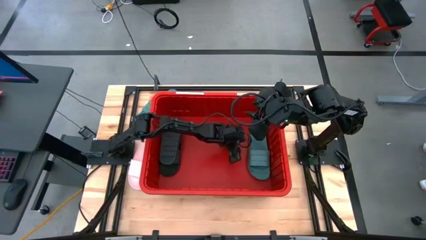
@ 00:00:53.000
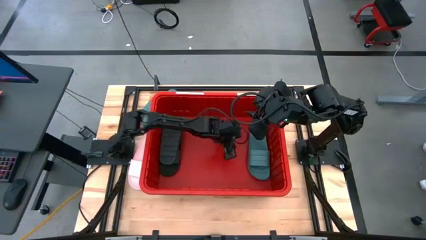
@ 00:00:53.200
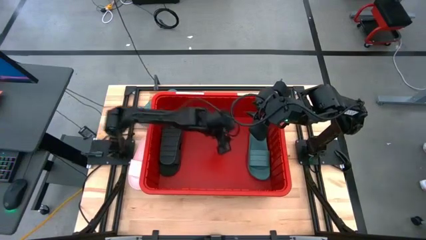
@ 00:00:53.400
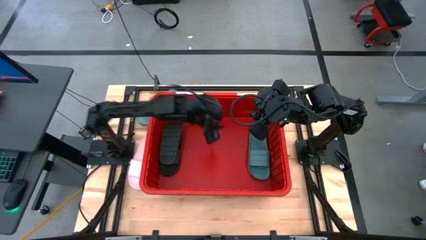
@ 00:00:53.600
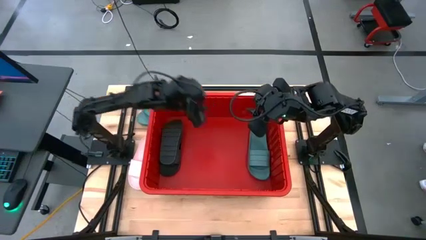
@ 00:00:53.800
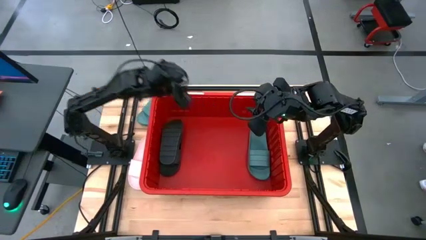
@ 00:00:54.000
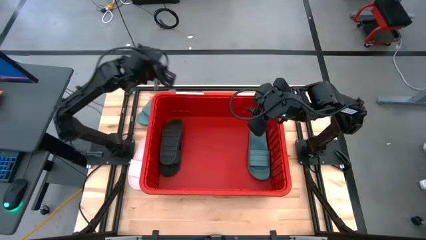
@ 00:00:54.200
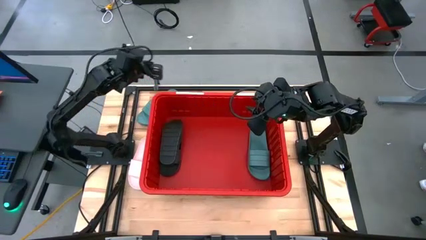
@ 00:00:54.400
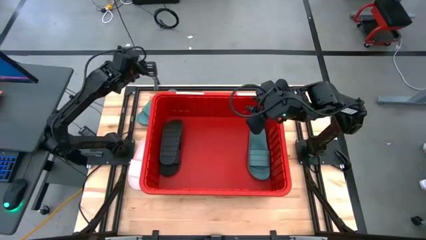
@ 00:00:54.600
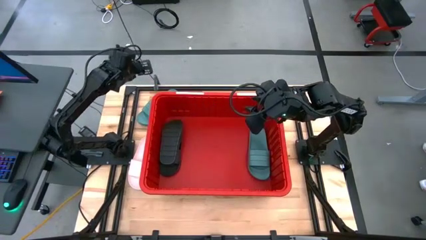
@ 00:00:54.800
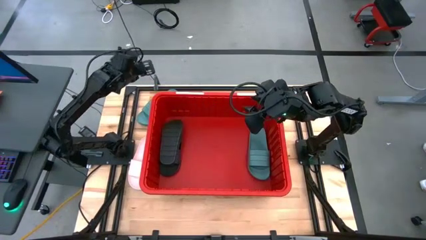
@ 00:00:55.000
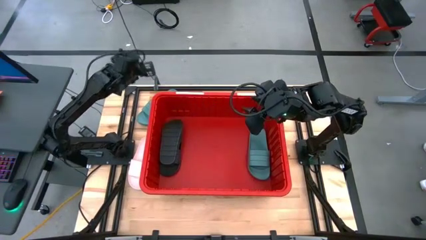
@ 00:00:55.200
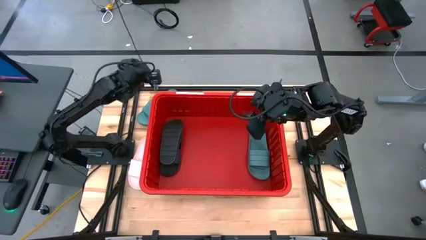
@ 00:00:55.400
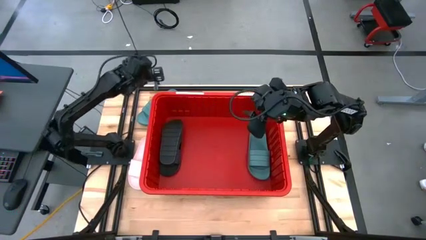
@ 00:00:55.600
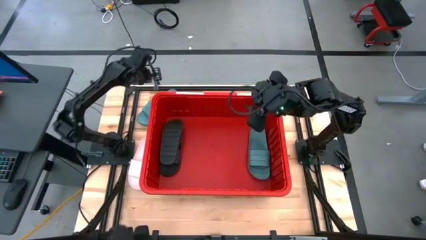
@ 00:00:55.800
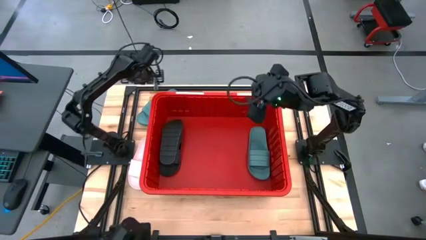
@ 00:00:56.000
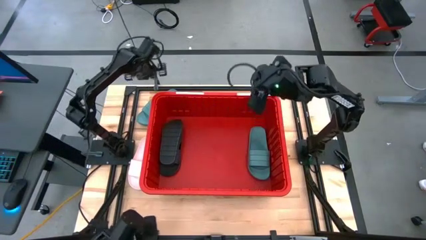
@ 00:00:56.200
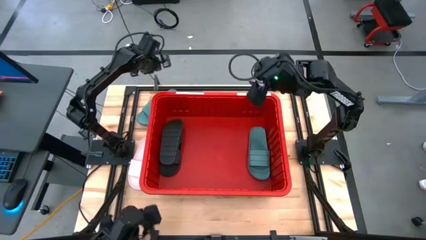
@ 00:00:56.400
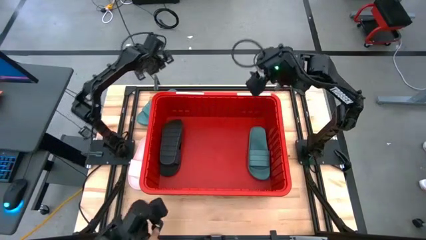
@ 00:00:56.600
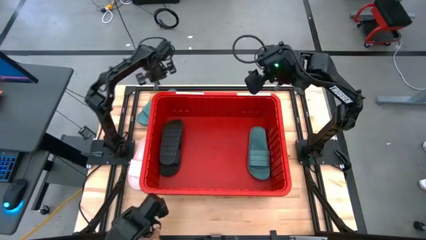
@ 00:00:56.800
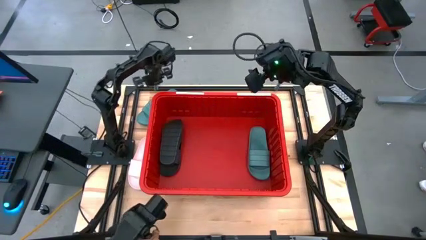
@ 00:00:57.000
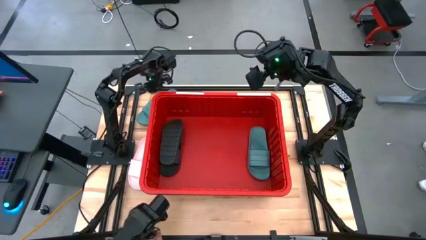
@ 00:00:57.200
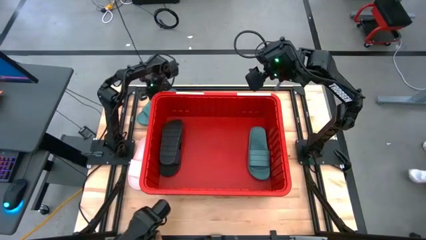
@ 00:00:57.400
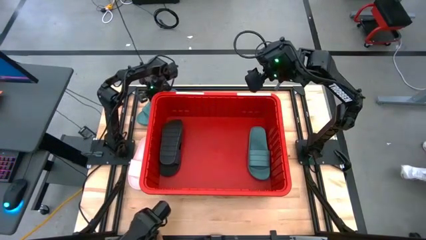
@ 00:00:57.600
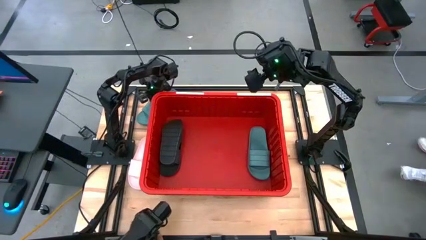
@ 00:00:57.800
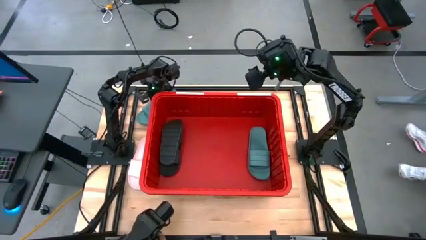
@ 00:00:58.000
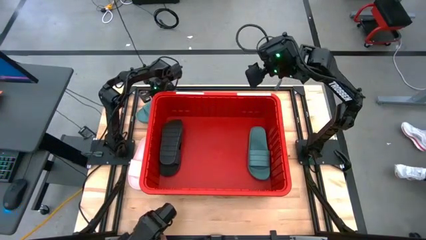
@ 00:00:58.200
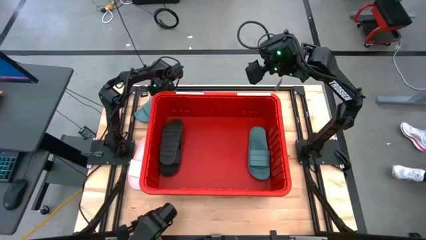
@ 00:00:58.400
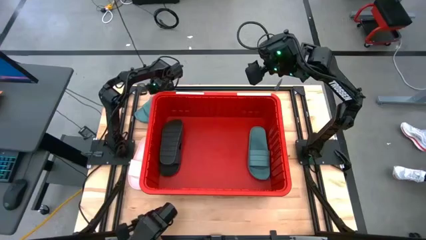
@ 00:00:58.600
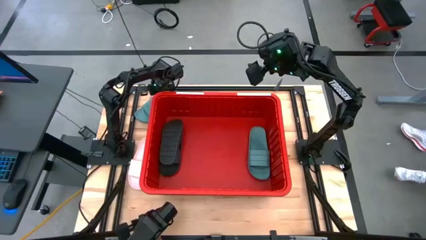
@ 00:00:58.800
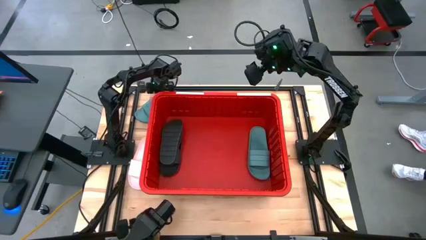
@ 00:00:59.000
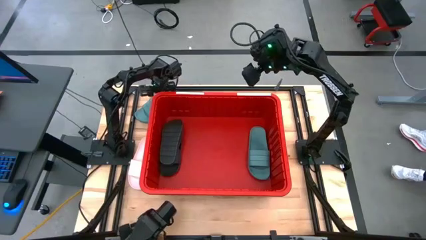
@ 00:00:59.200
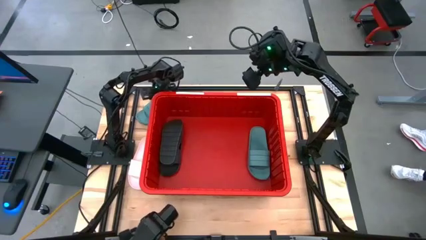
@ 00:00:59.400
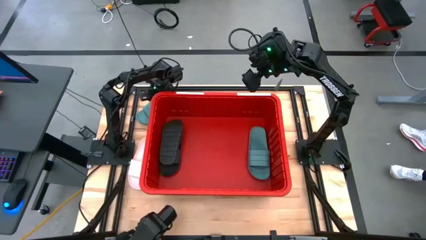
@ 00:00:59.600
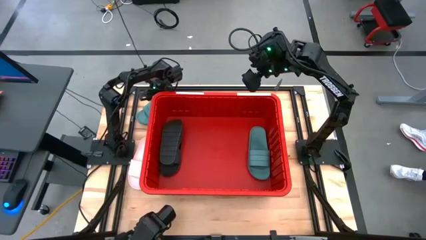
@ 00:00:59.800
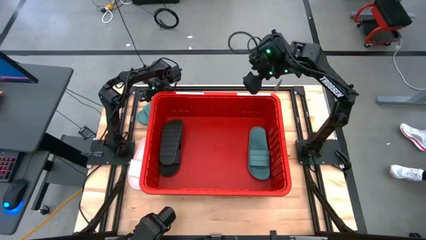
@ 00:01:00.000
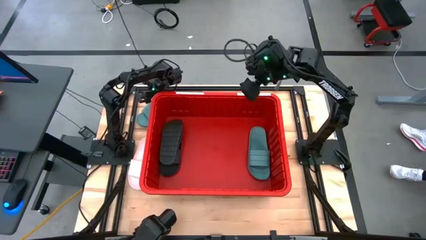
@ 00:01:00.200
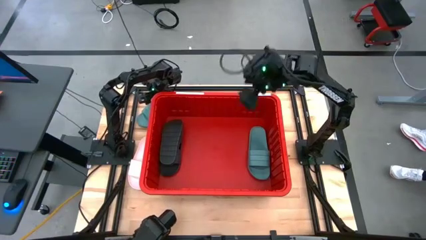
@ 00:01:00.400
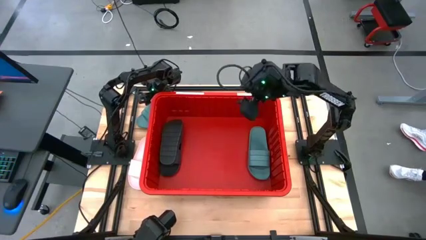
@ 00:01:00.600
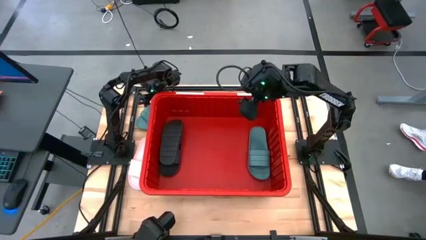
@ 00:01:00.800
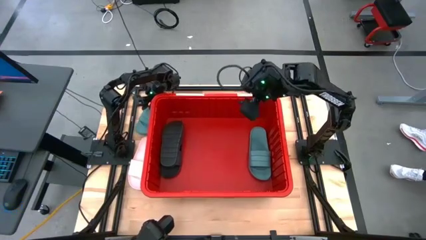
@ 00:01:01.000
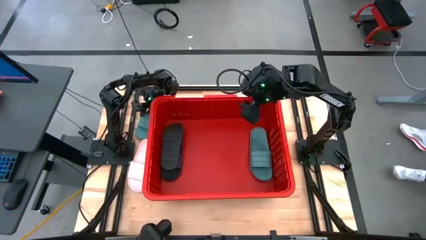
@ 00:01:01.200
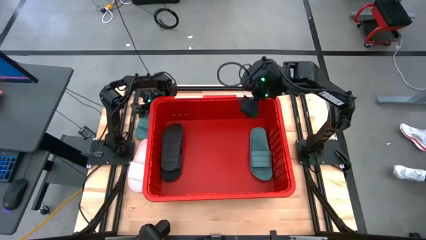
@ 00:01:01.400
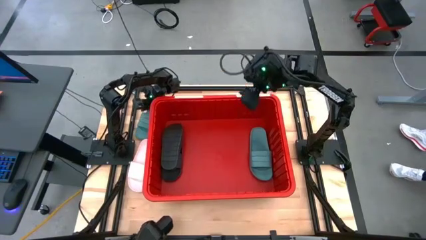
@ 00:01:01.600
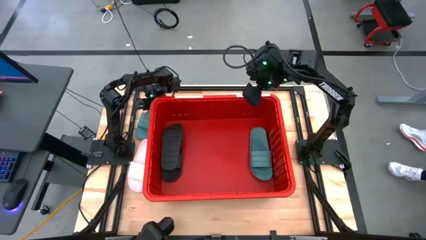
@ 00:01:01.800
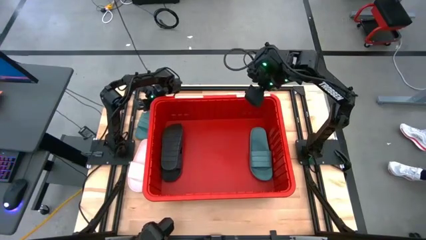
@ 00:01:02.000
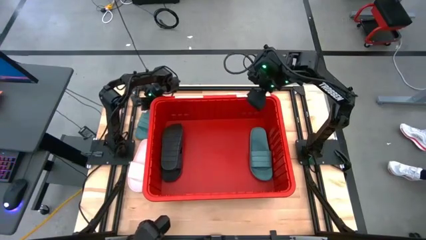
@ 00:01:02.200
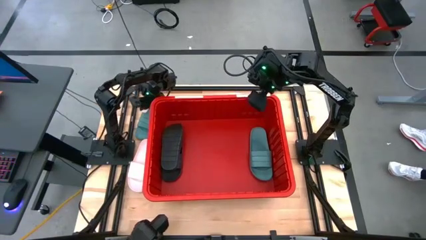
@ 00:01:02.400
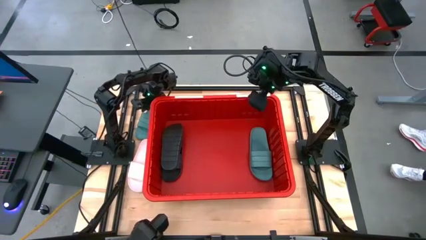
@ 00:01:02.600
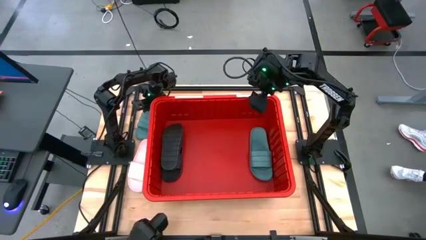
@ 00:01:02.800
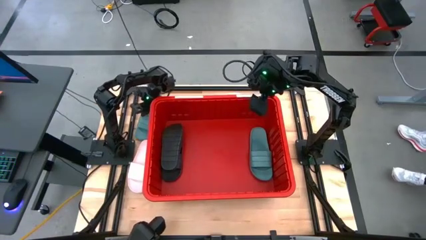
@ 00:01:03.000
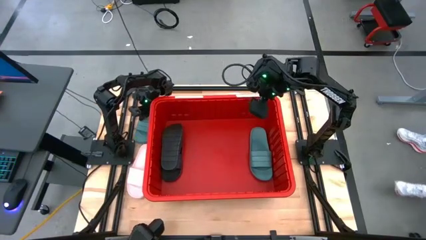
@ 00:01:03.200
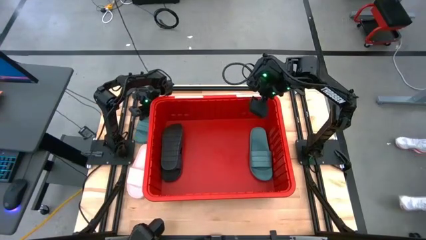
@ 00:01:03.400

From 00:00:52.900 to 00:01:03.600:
Task: Pick and place slides into bin
Put the green slide on top of the other green slide in the container
